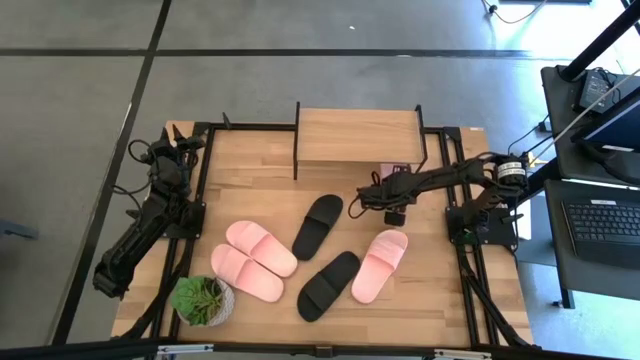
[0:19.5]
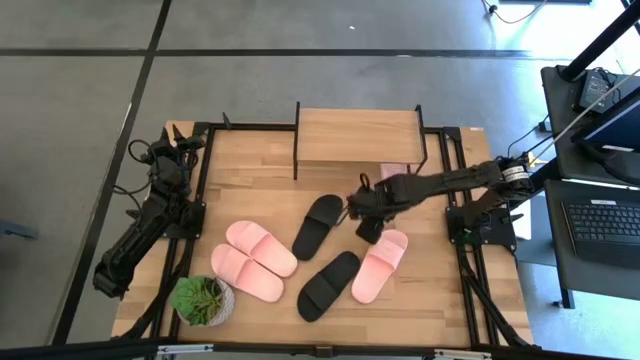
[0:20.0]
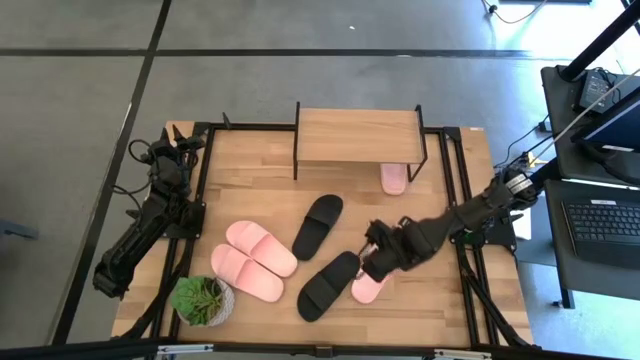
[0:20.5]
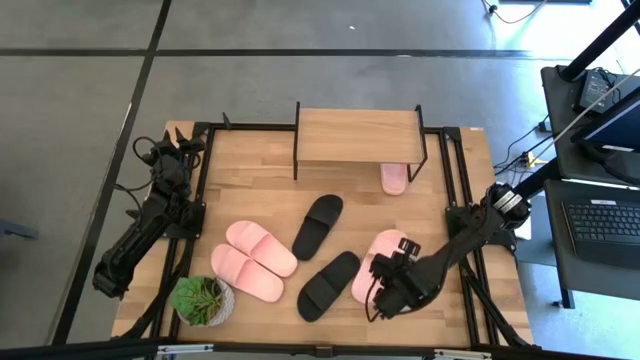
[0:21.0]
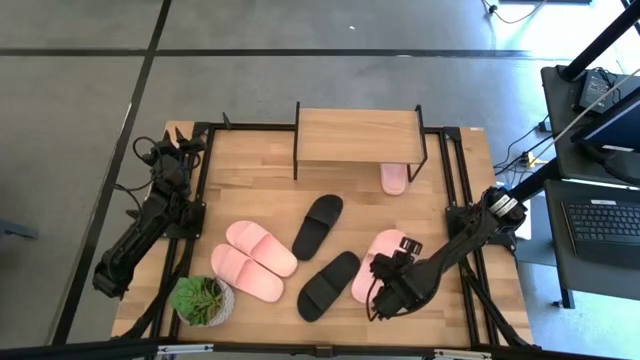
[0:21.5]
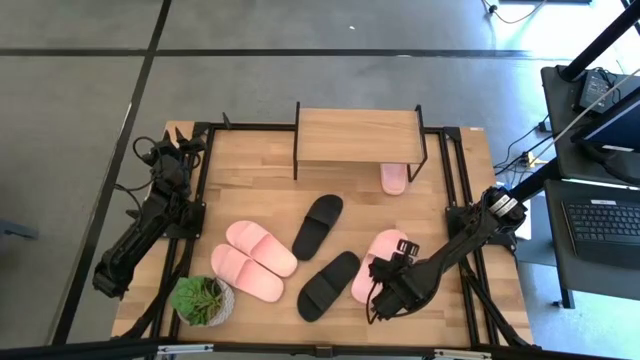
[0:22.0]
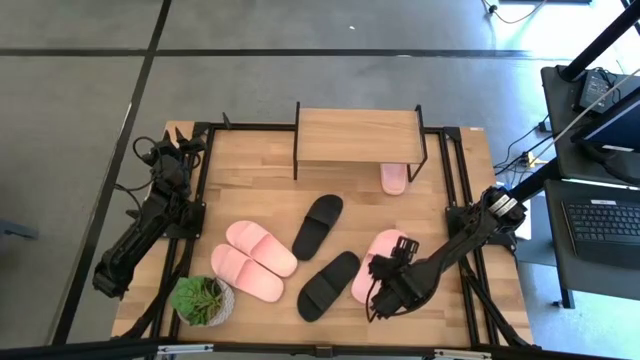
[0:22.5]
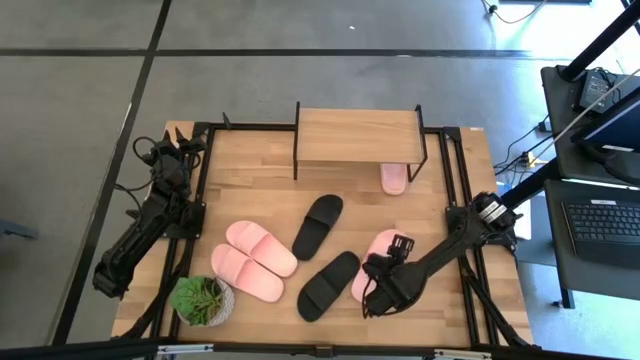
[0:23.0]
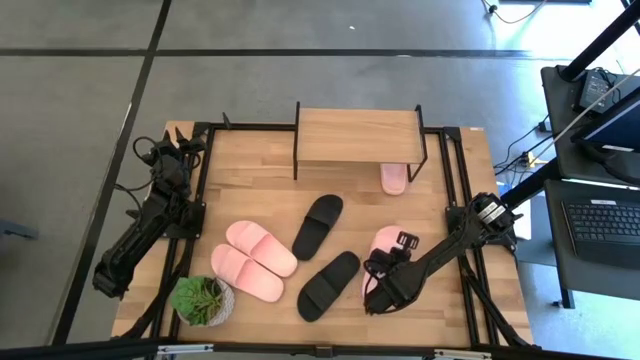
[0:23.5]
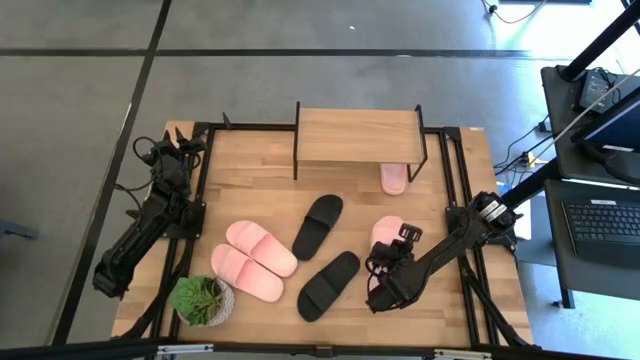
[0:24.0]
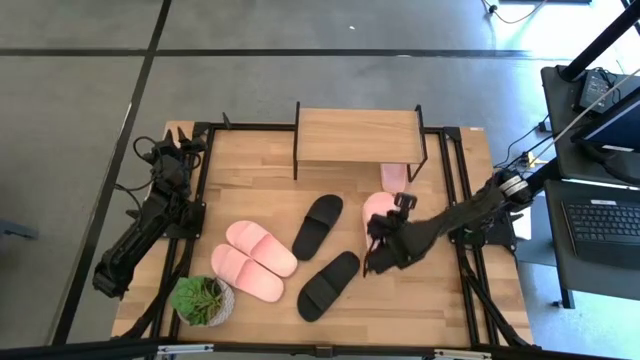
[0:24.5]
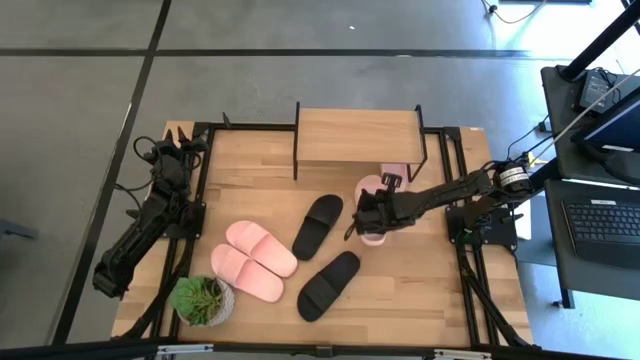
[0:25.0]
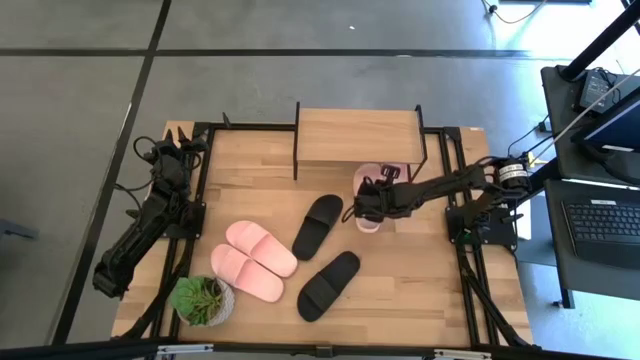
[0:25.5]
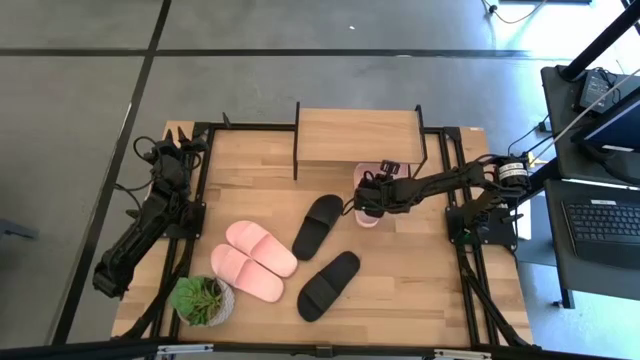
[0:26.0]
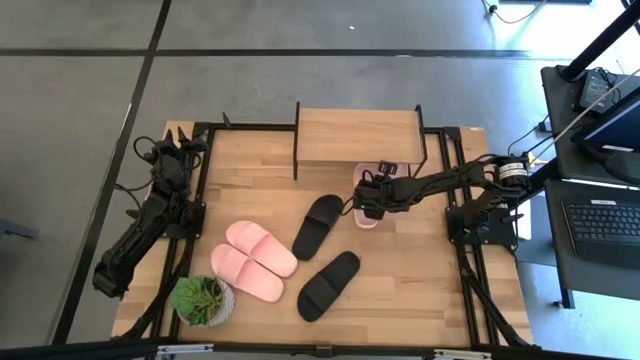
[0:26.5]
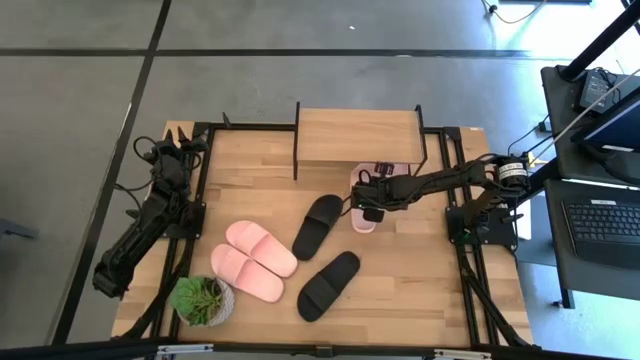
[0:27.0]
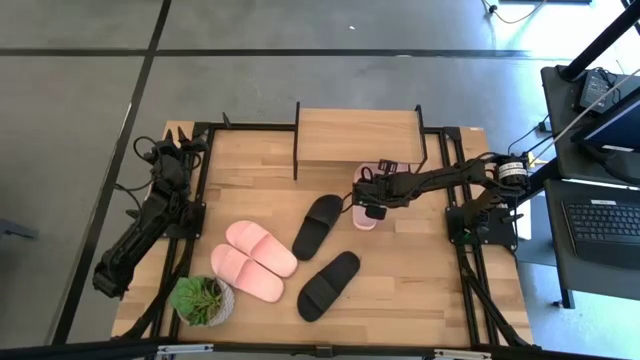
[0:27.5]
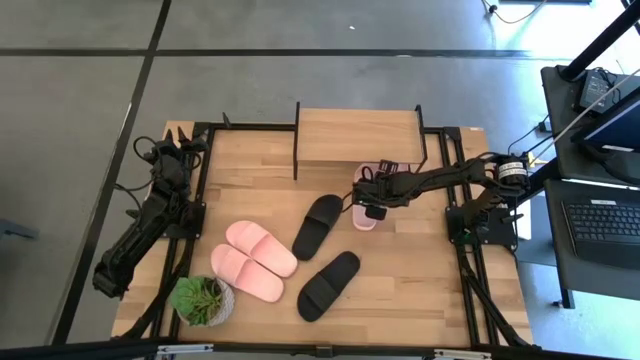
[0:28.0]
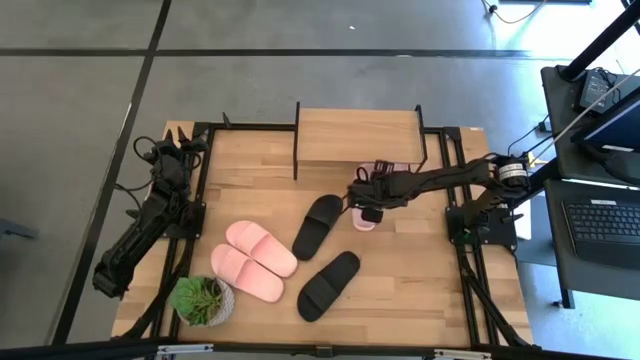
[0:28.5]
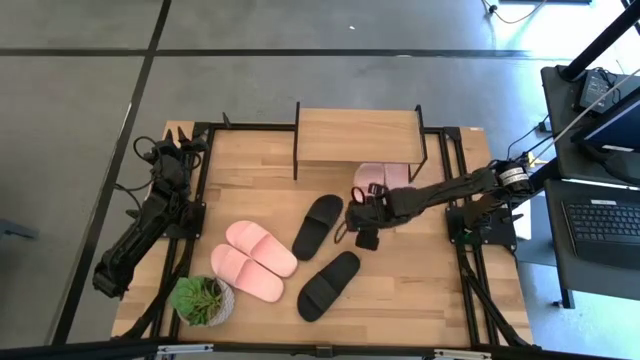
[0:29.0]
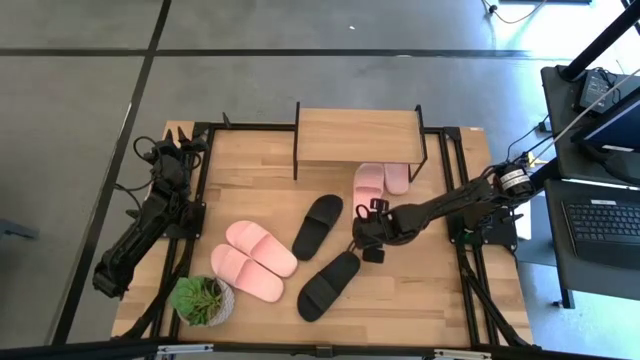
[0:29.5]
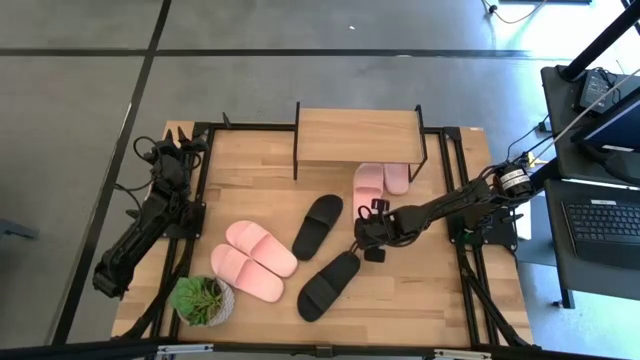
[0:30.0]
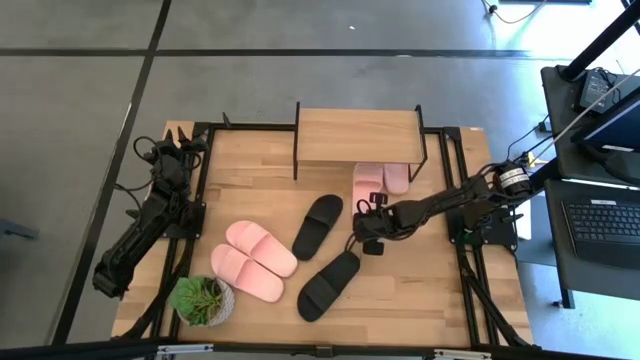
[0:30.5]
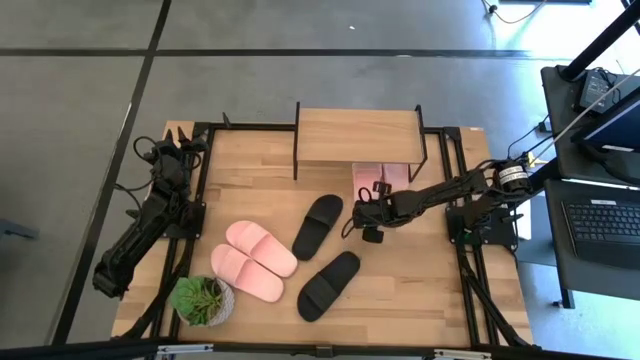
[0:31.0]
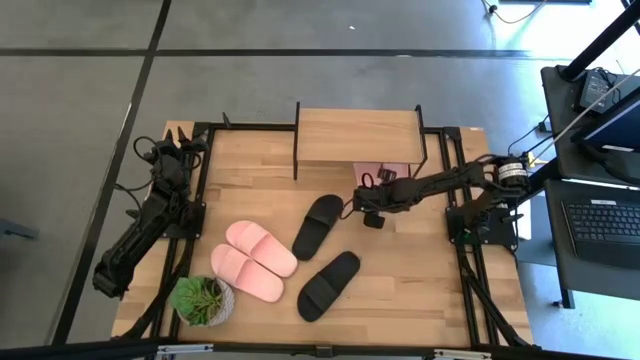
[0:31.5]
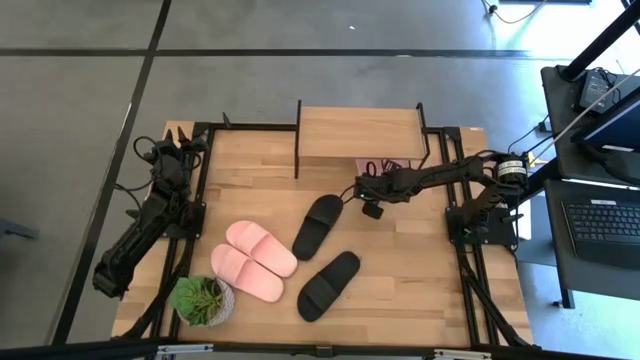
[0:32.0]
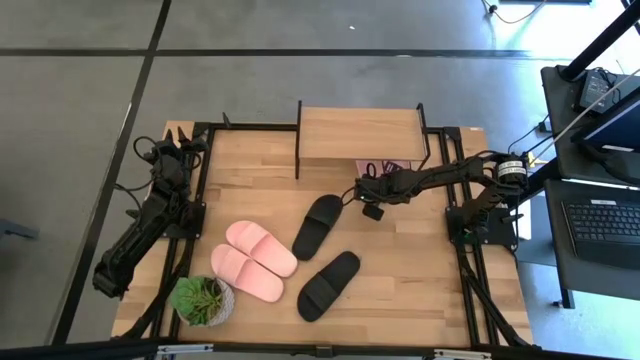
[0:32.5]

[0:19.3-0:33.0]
Task: Pick and place slides into the shelf
Put the pink slipper under the shelf

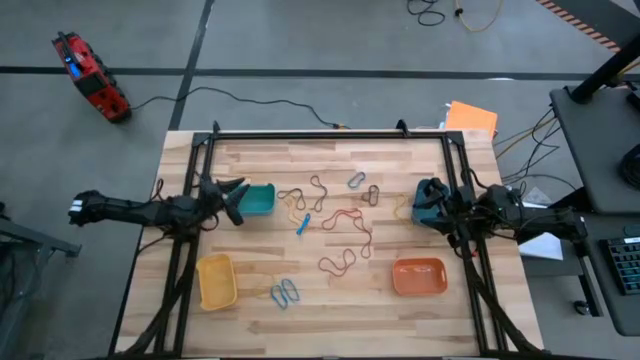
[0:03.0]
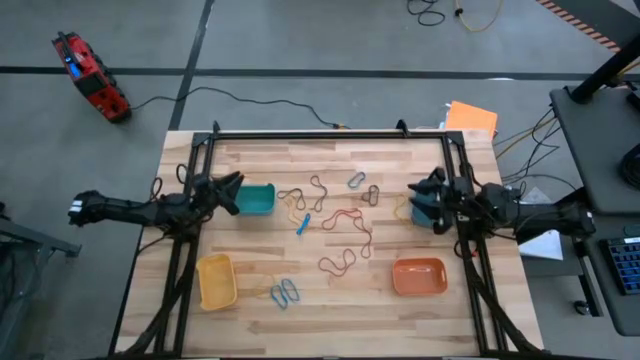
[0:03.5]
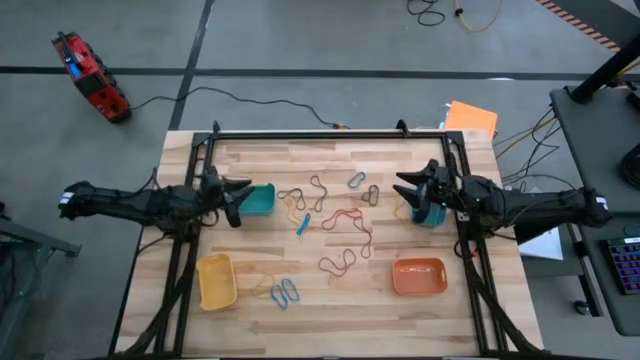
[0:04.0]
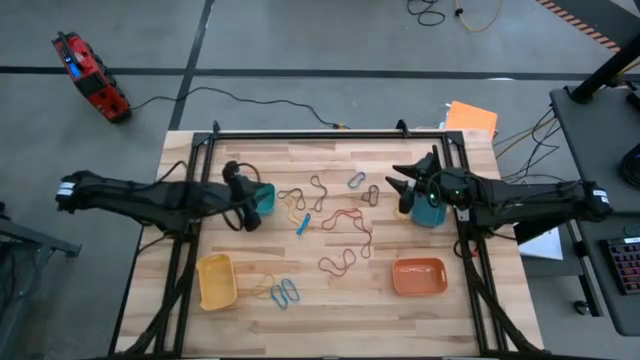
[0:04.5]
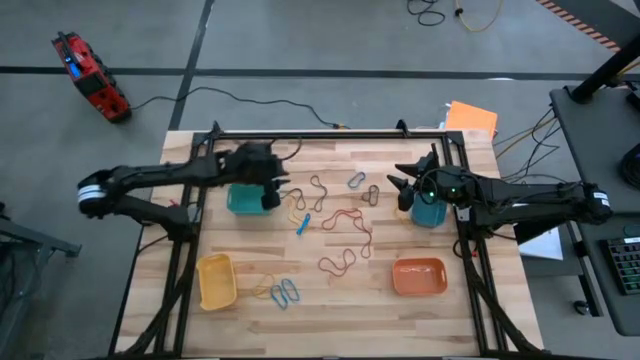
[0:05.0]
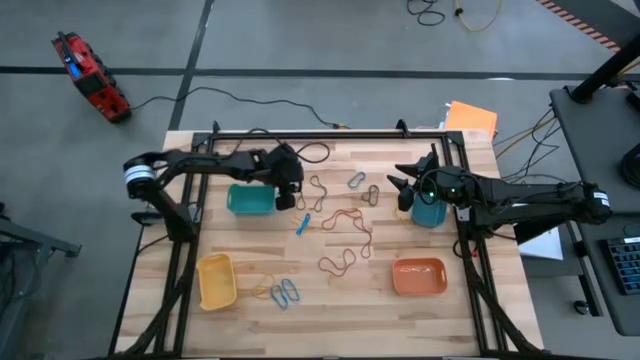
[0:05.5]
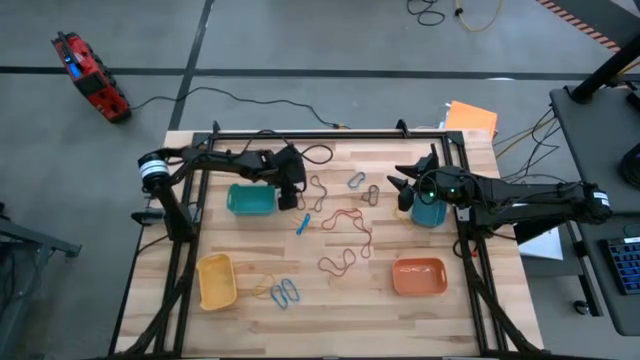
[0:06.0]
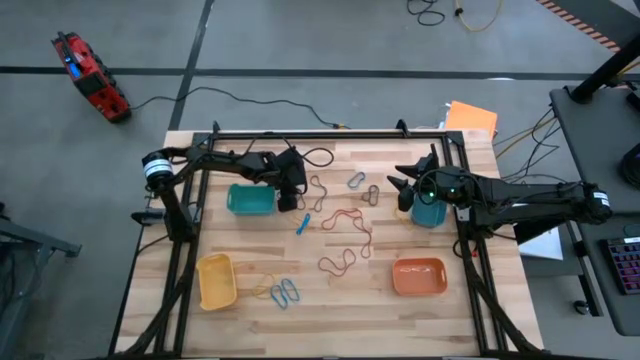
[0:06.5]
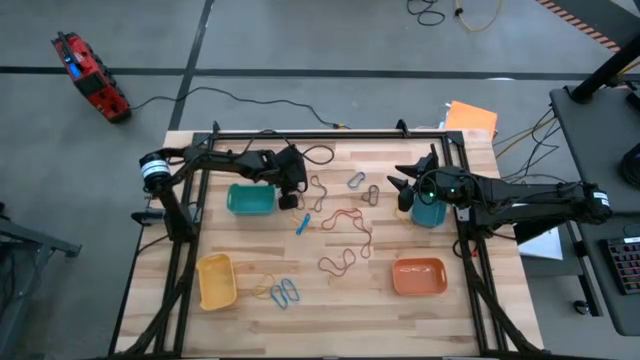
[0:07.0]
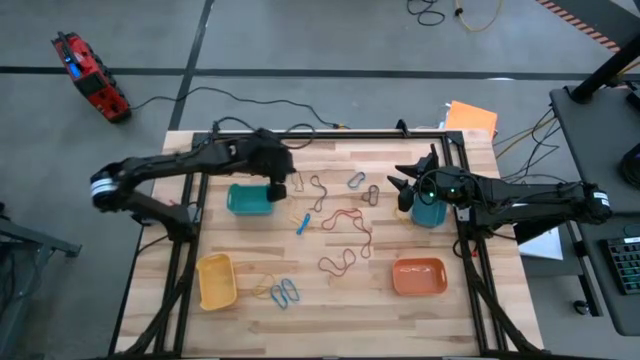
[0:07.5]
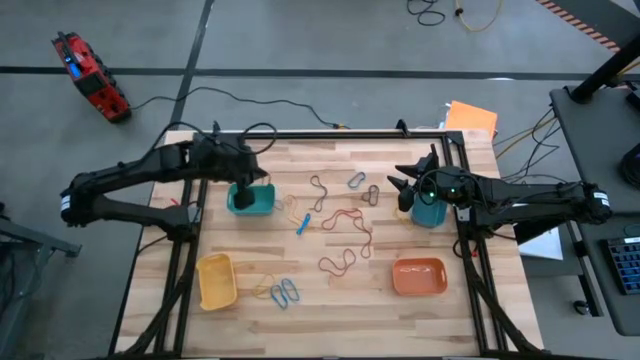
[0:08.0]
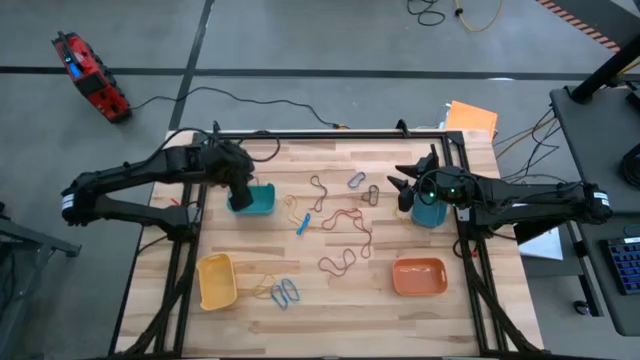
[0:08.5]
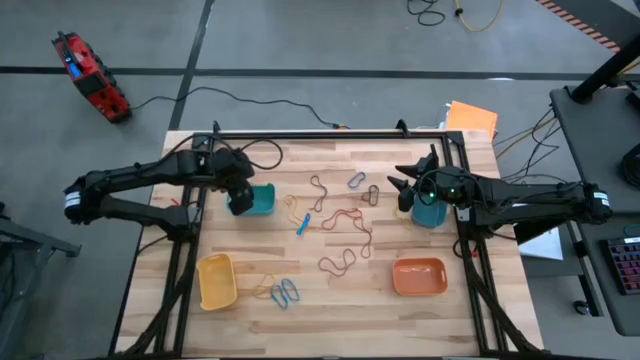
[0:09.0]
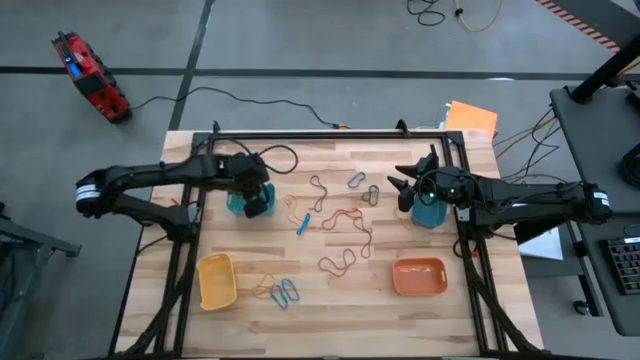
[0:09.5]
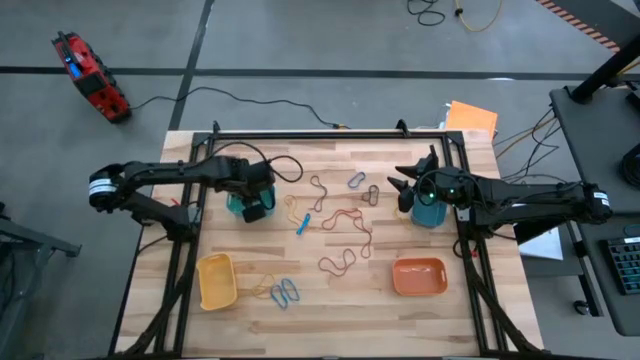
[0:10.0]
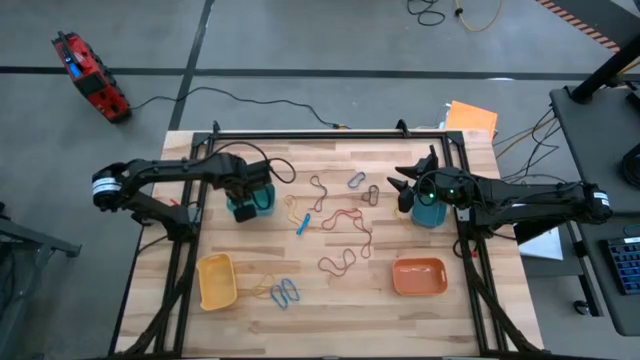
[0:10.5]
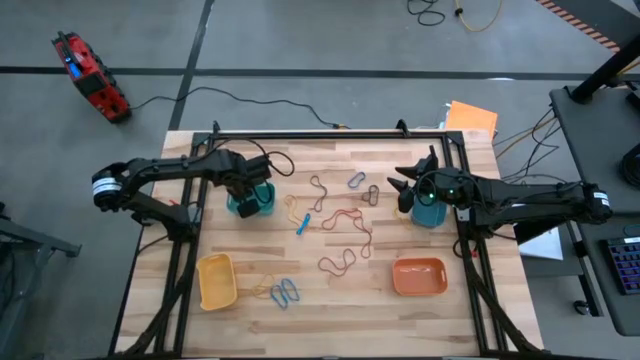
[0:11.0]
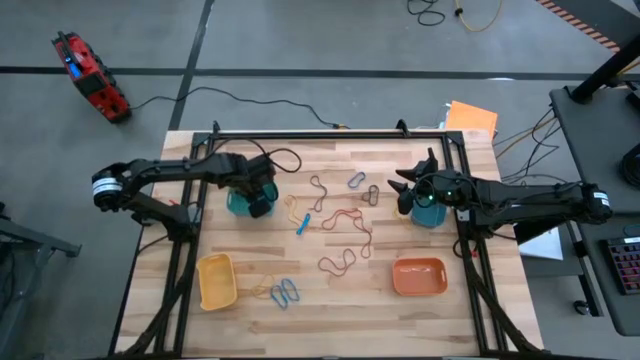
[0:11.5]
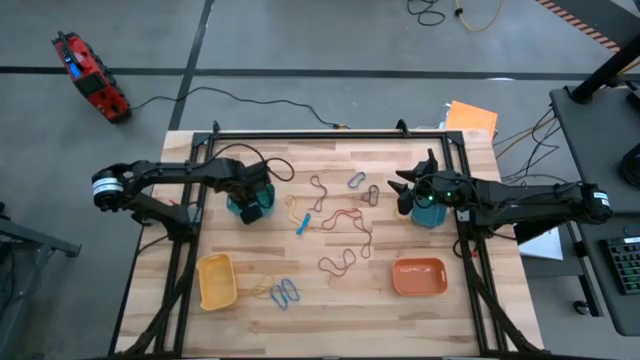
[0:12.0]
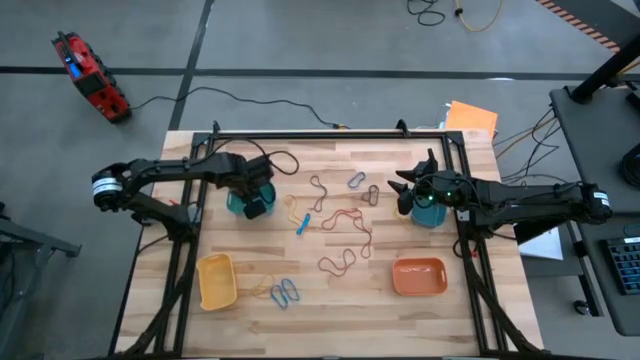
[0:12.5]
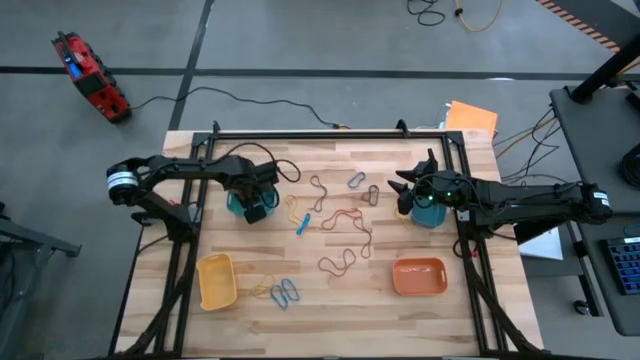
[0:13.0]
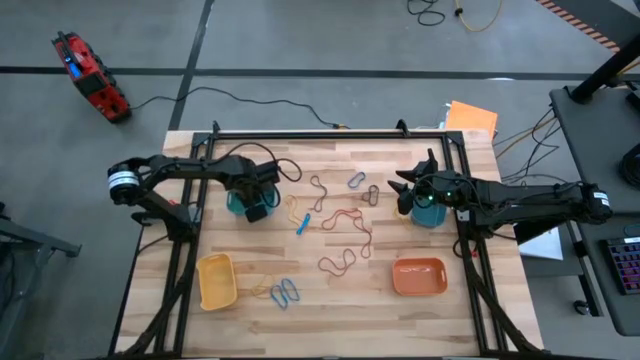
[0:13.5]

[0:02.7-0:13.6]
Task: Sort rubber bands into baskets
Put the brown rubber band into the green bin
